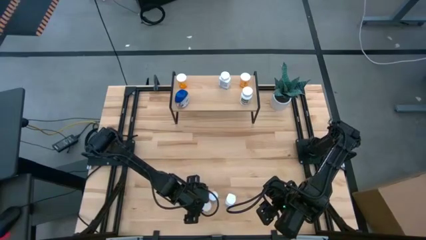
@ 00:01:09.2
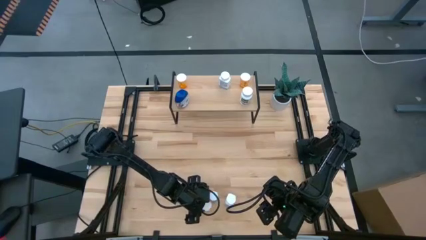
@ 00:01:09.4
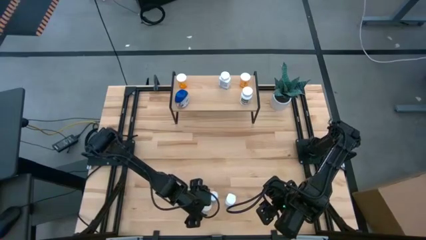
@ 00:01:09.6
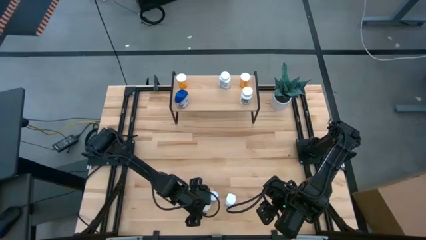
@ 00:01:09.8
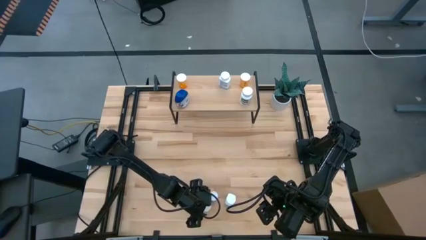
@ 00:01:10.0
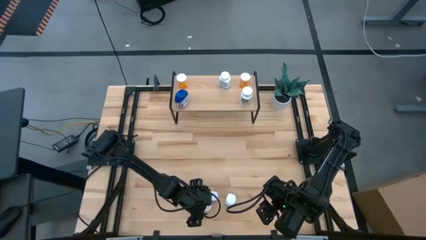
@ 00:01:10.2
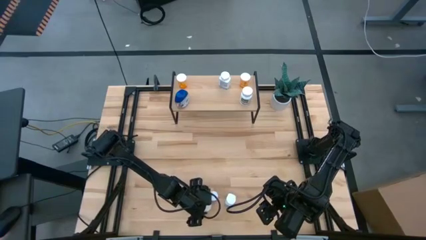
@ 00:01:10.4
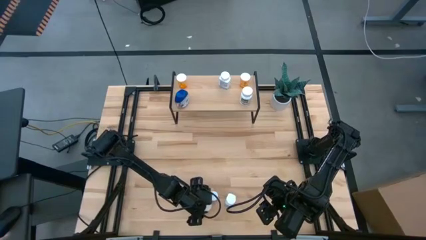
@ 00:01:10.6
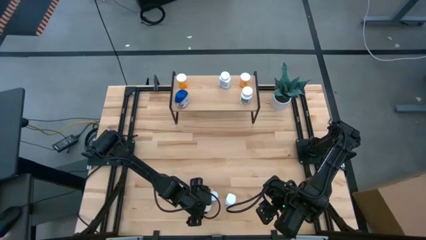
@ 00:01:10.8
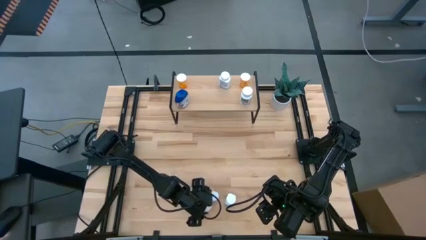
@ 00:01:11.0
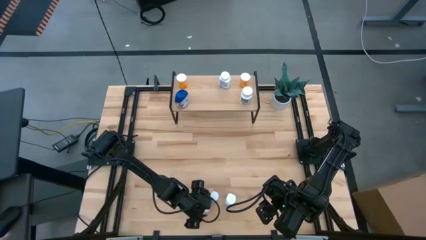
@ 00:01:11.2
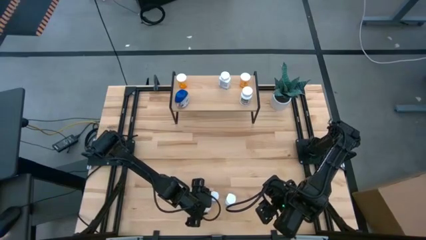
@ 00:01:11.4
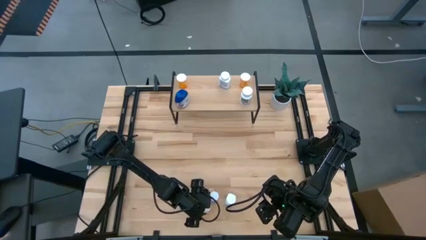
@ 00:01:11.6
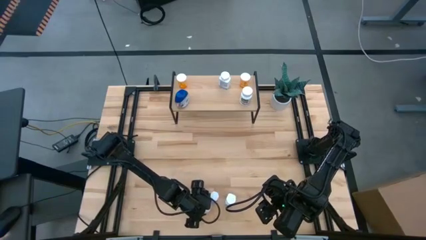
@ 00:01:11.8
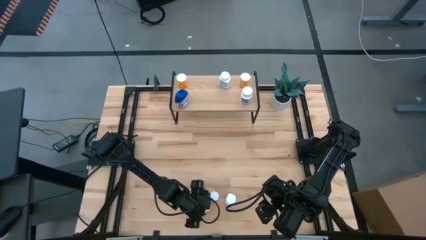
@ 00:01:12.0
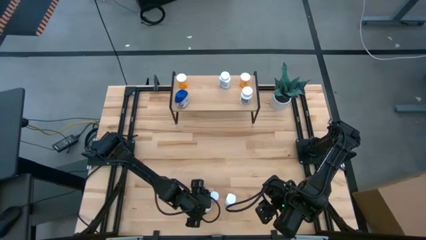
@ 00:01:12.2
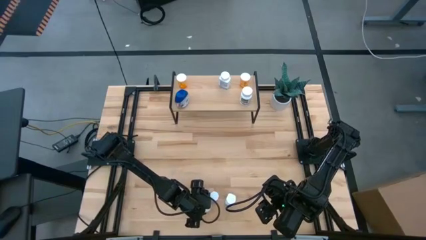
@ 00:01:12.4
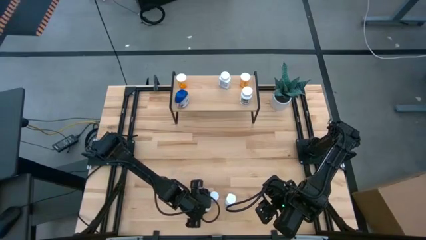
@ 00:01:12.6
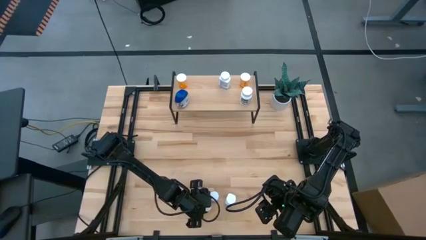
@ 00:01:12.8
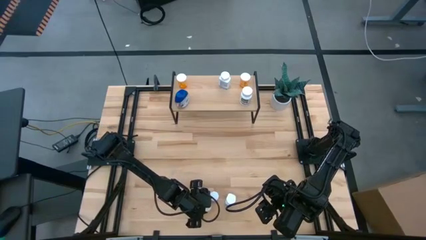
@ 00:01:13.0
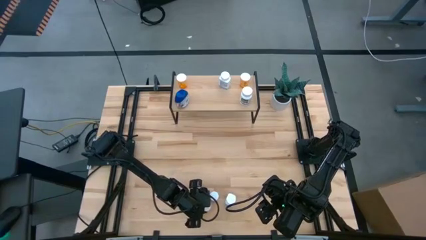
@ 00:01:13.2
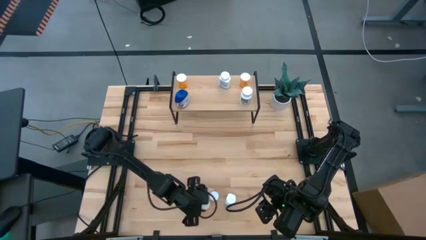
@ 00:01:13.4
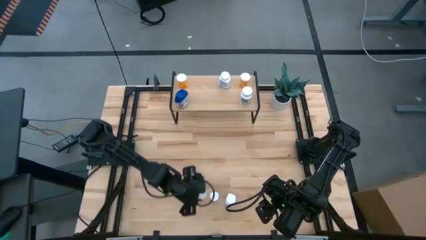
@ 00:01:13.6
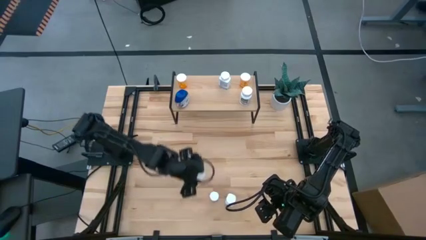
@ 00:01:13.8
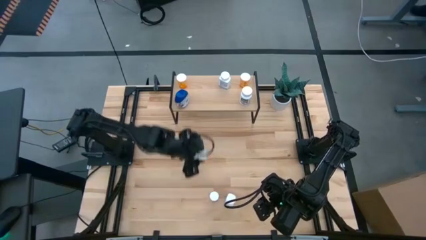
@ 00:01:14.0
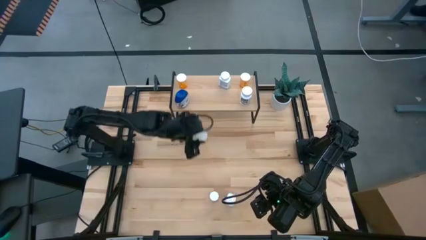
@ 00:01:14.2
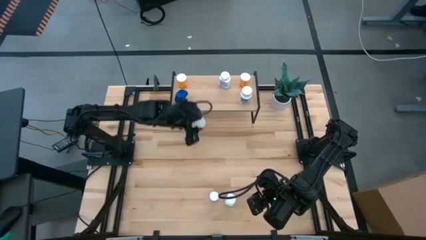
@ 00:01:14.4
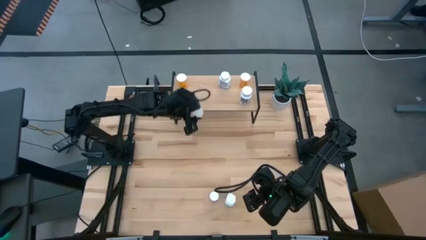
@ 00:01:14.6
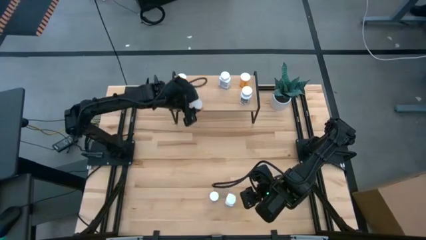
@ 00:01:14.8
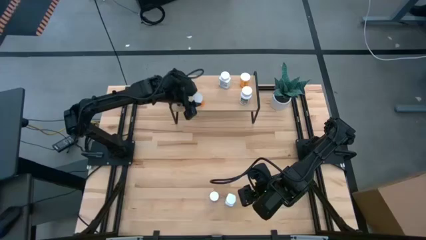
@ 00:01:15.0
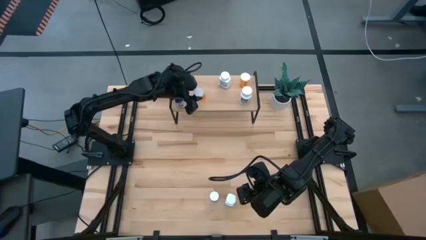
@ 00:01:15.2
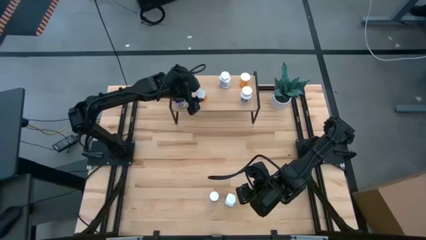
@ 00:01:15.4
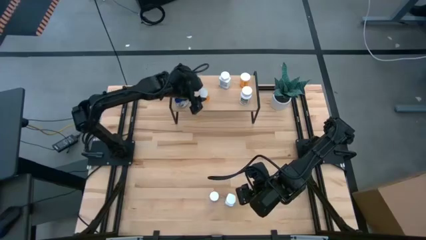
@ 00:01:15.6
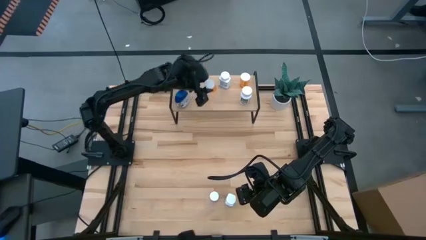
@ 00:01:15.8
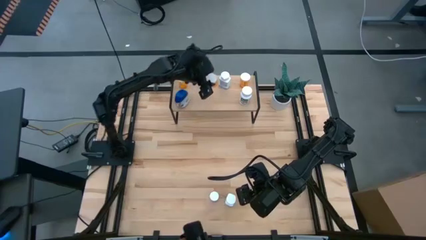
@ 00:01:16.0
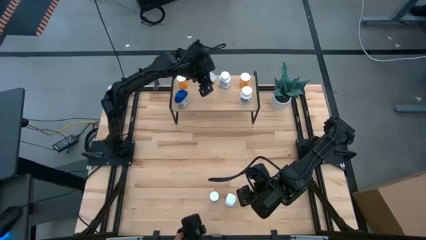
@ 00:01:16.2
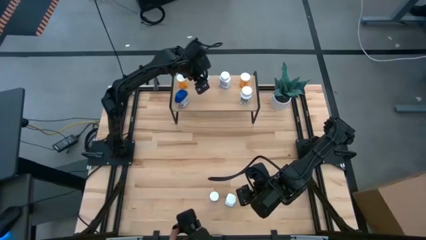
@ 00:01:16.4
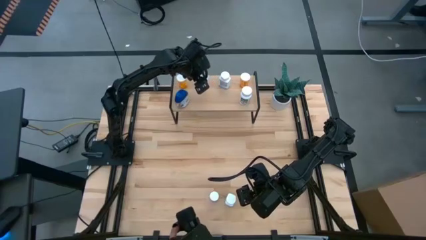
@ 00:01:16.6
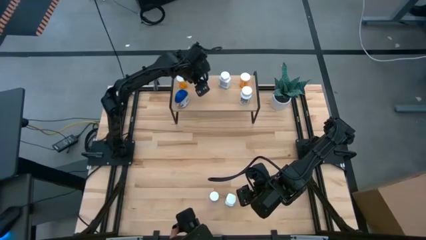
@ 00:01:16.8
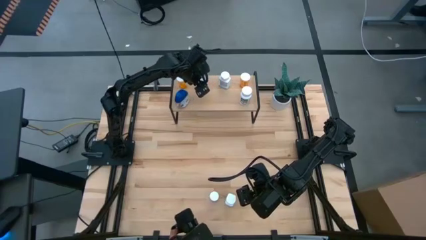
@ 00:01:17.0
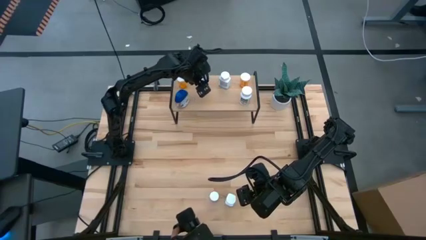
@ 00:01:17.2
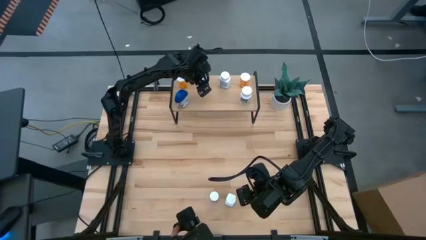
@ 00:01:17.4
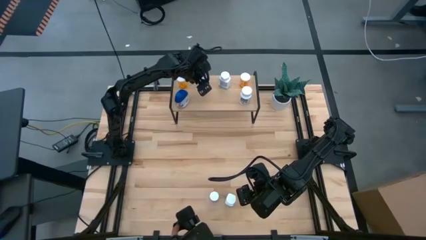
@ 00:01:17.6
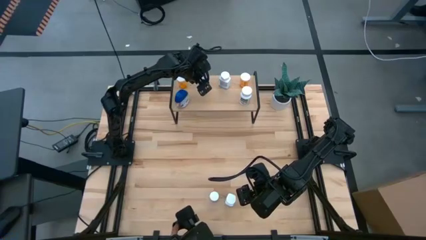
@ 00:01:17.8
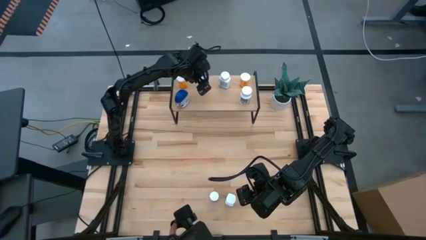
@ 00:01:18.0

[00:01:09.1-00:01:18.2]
Task: Pick and place medicine bottles onto shelf by color
Put the orange bottle on the shelf

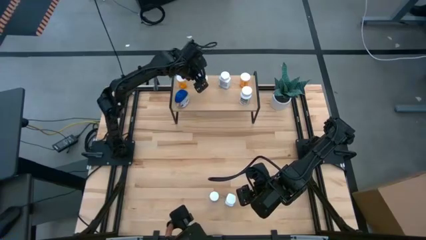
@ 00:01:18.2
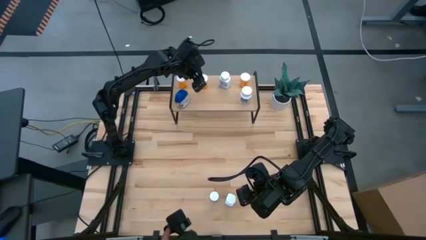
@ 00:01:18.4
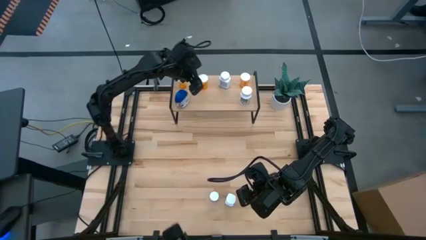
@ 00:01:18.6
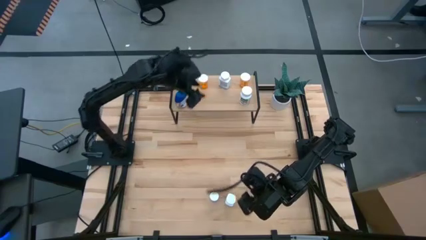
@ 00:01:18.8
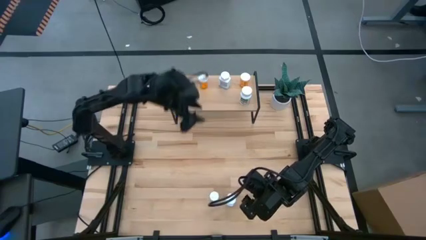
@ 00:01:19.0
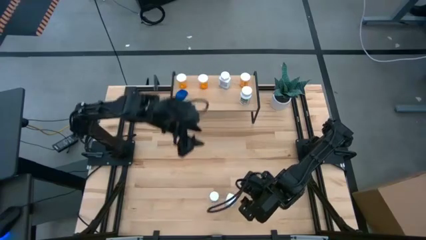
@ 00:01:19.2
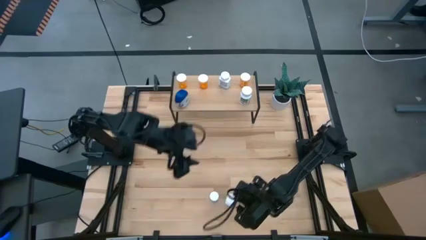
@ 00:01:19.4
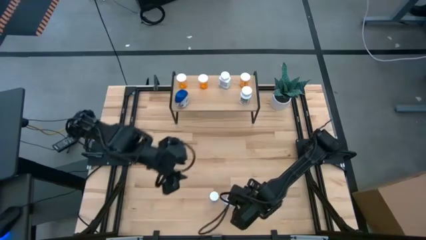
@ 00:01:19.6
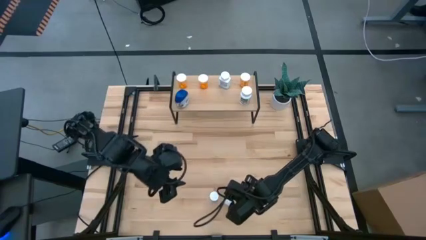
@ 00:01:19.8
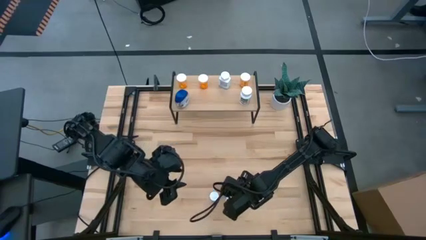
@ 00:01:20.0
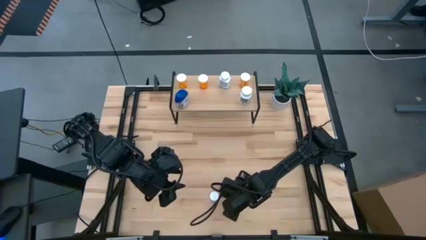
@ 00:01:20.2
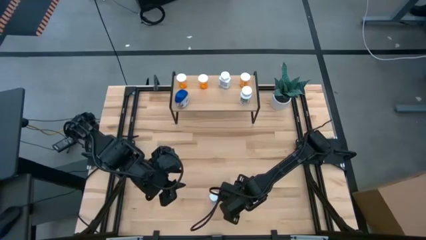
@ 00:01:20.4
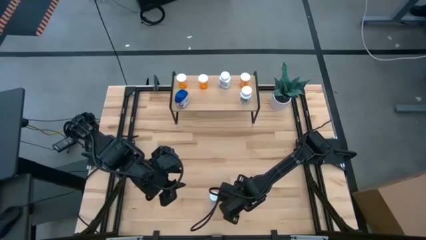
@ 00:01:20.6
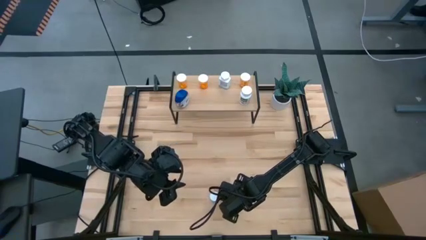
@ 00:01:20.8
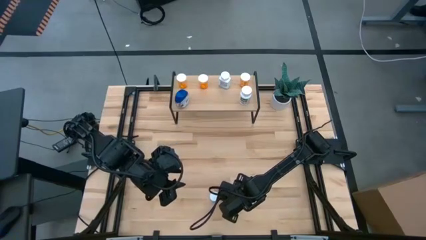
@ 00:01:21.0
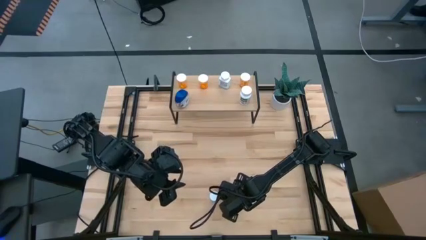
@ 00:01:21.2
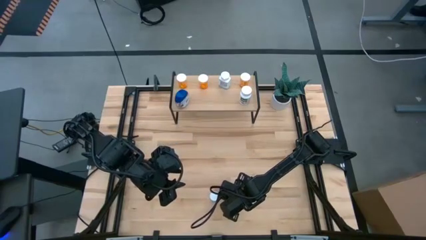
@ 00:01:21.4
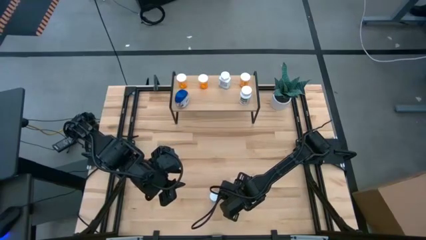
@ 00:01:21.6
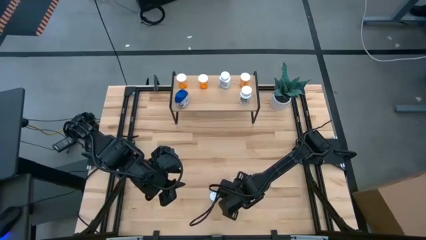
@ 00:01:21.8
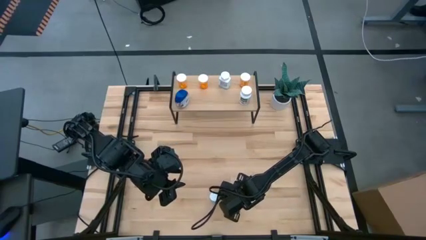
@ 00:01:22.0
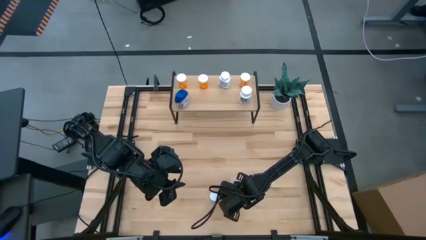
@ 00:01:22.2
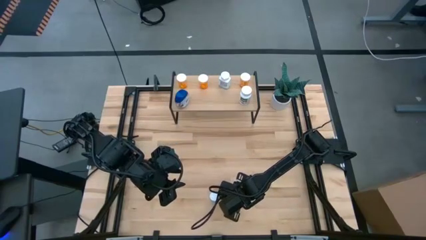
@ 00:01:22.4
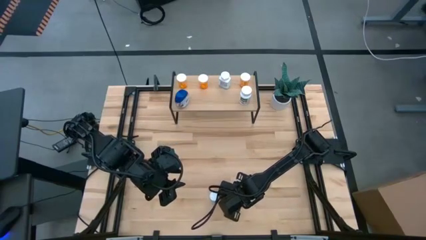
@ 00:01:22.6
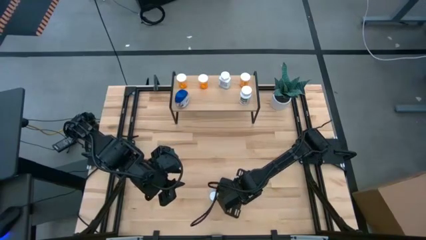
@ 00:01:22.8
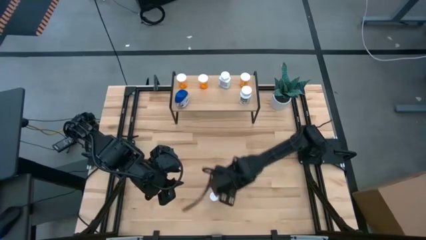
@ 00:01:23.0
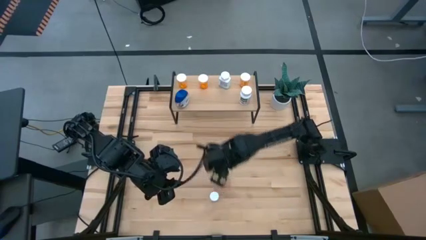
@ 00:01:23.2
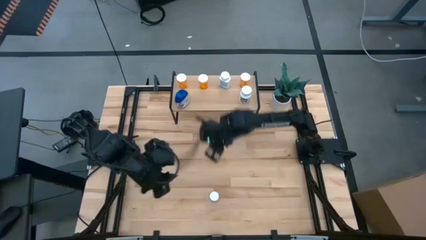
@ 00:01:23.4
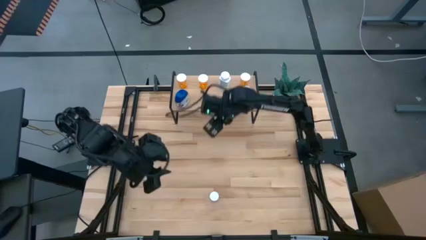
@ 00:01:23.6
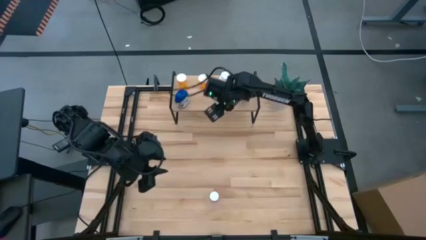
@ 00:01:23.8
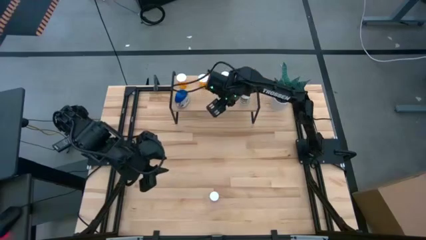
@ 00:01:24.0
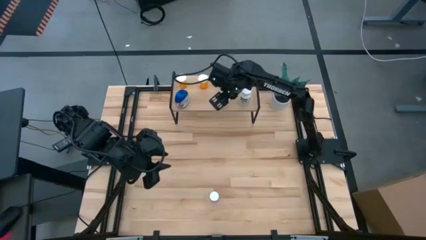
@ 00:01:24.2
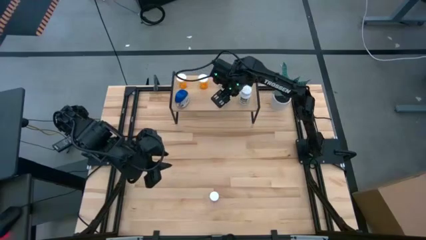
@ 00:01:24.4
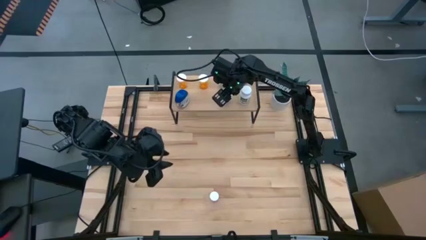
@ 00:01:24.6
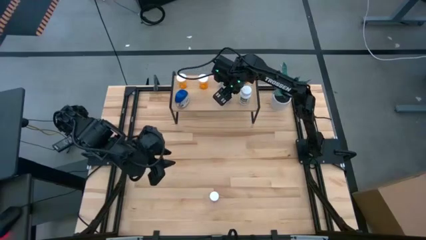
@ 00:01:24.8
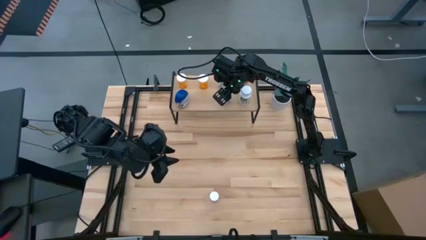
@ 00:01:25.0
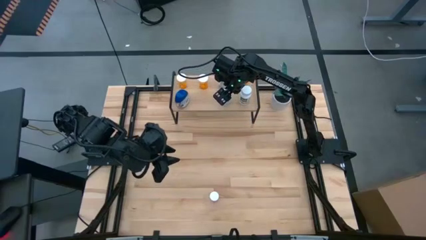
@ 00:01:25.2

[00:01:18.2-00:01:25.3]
Put the light blue bottle on the shelf
